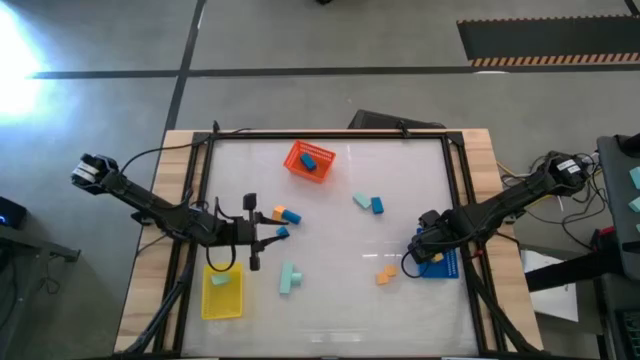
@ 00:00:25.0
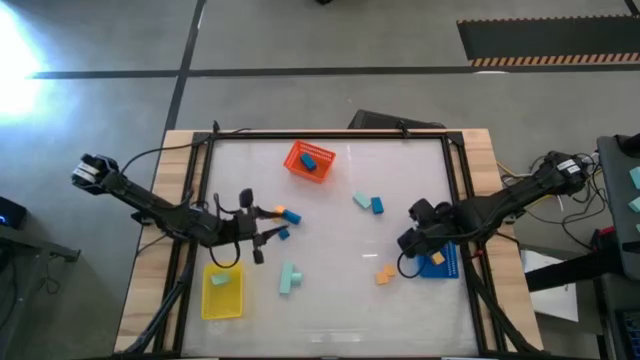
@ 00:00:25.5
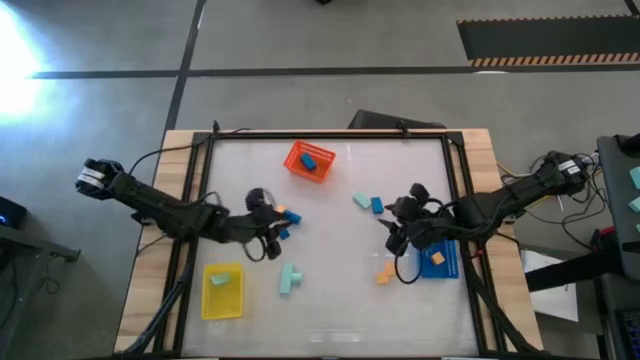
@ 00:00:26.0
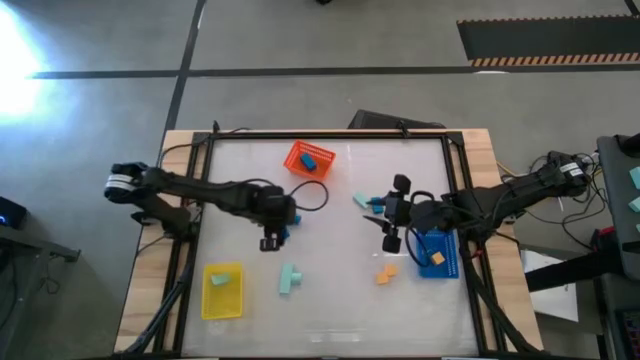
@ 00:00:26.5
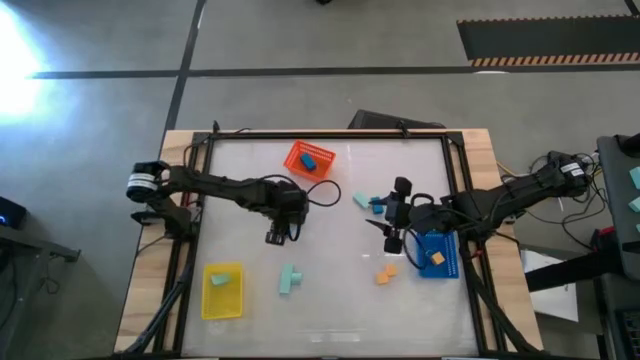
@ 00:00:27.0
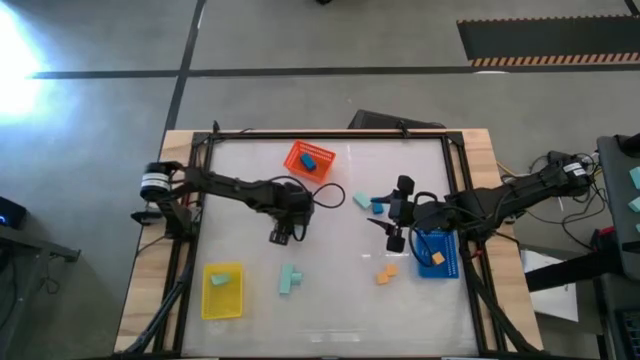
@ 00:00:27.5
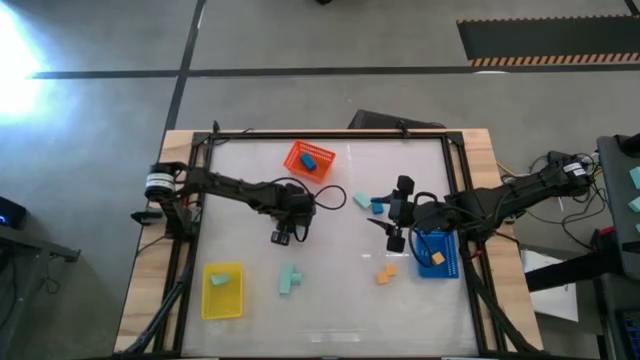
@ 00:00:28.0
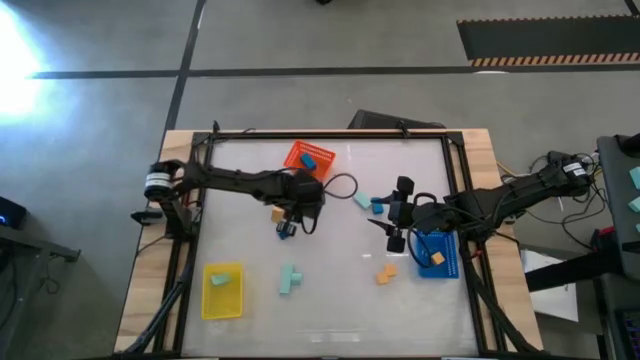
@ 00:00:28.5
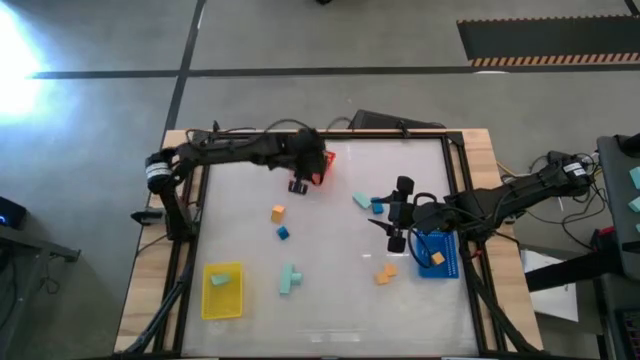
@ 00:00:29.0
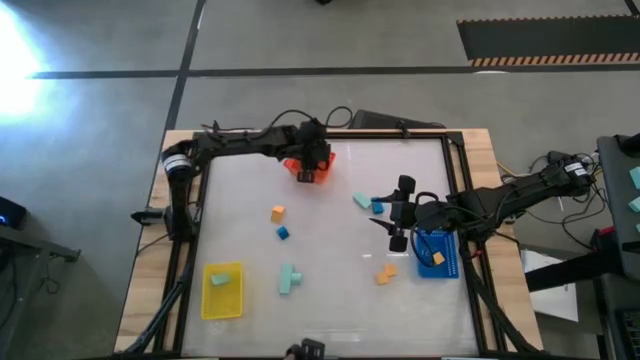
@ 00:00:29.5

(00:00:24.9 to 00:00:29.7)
Task: Sort & place blocks by color
Put the blue block into the orange bin

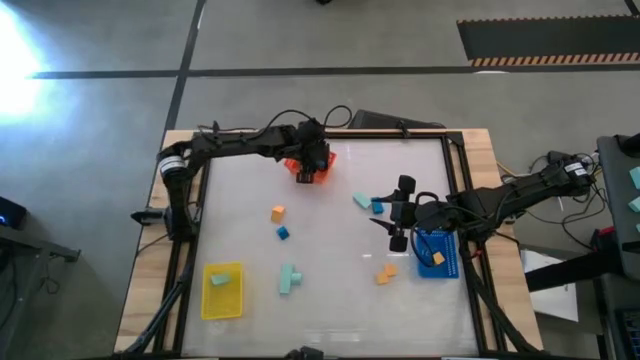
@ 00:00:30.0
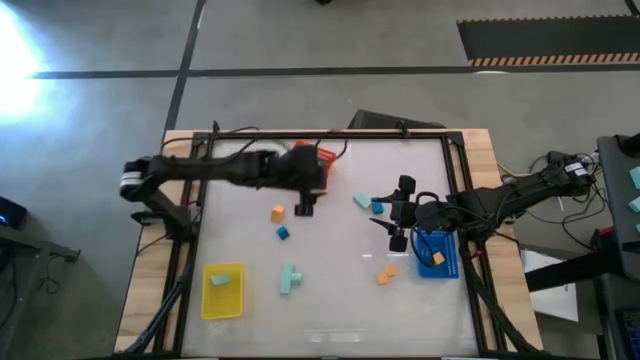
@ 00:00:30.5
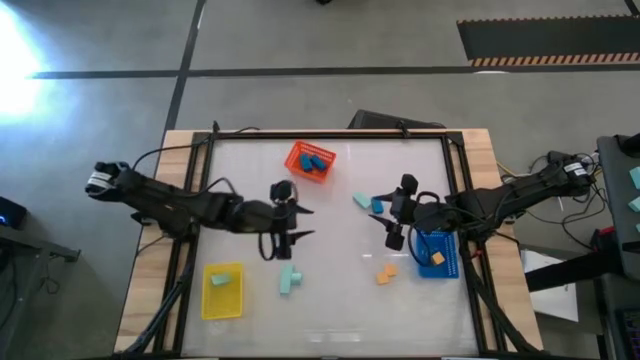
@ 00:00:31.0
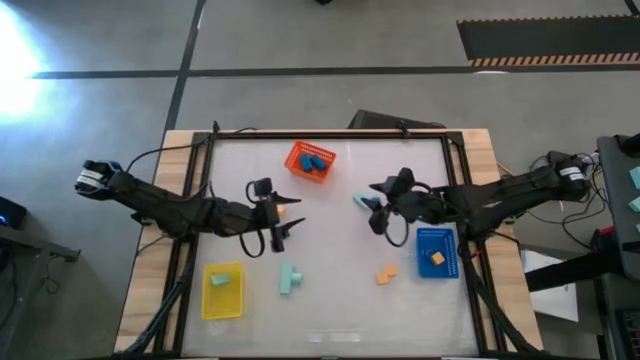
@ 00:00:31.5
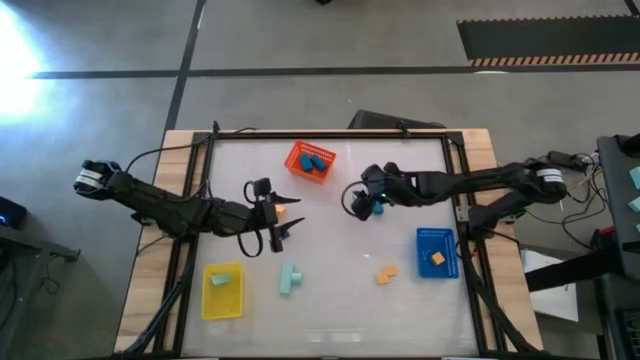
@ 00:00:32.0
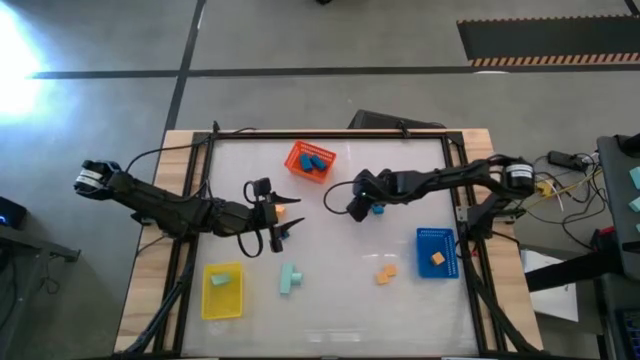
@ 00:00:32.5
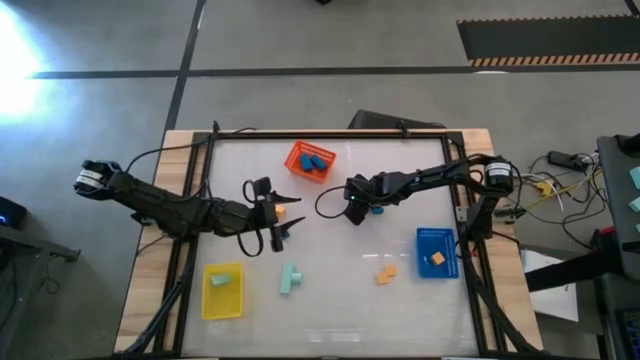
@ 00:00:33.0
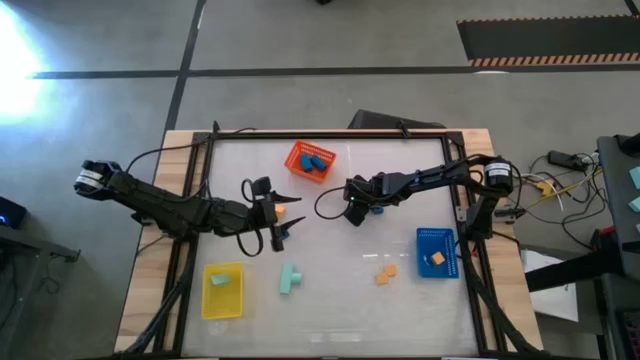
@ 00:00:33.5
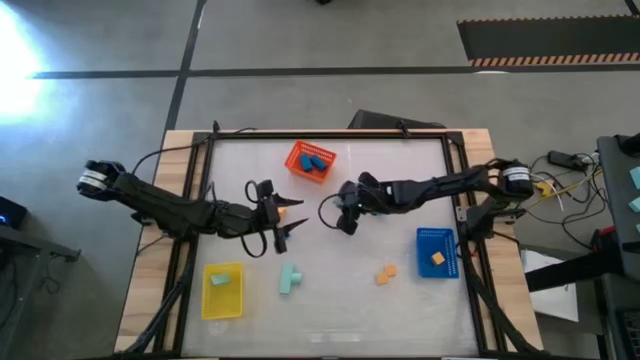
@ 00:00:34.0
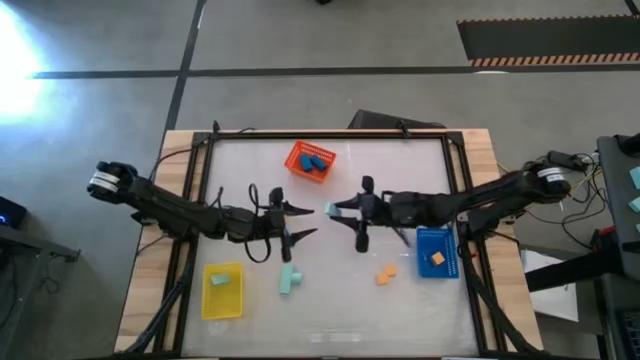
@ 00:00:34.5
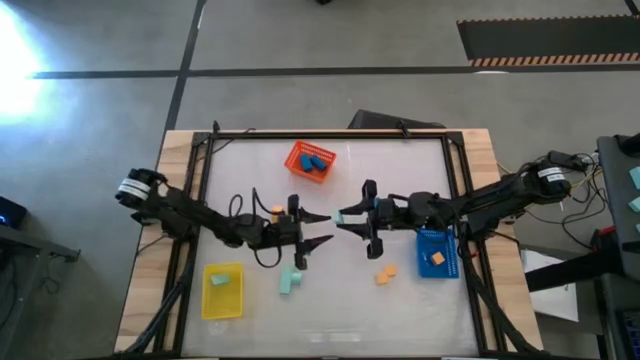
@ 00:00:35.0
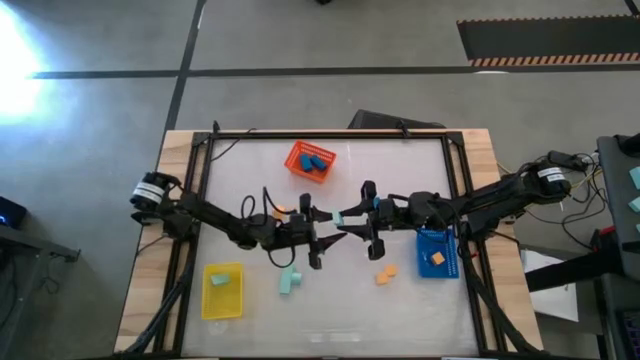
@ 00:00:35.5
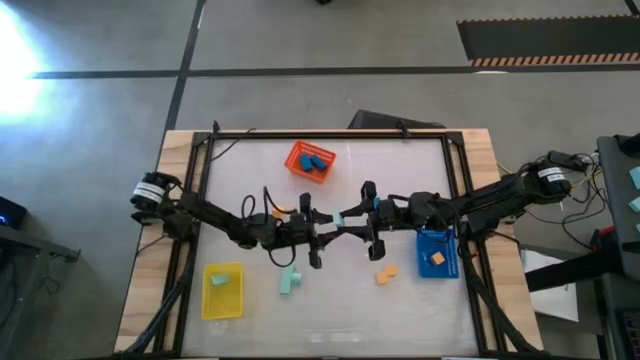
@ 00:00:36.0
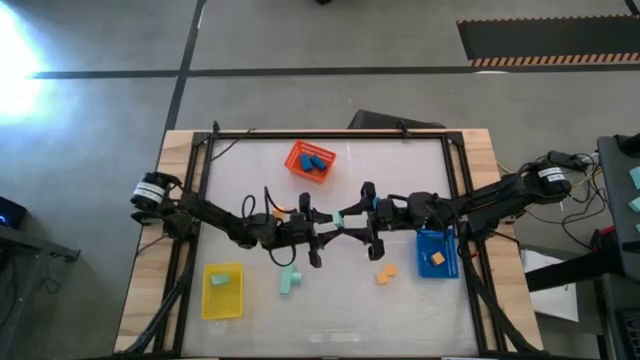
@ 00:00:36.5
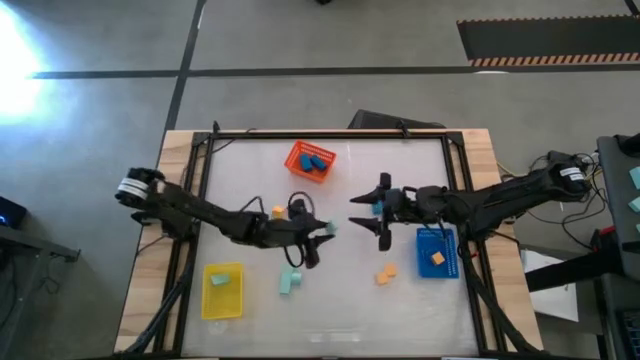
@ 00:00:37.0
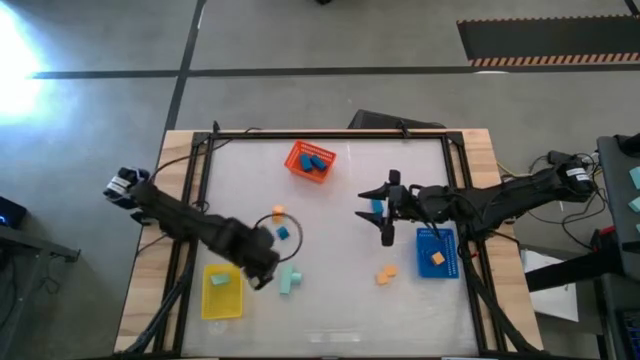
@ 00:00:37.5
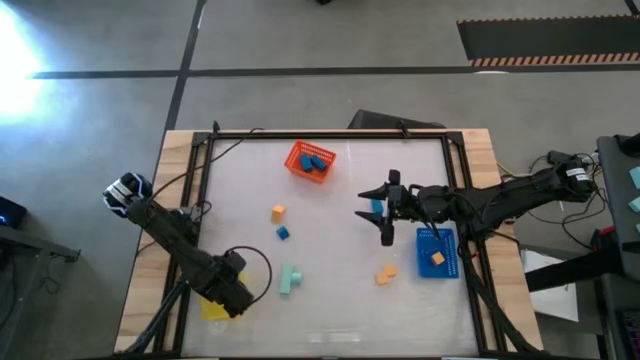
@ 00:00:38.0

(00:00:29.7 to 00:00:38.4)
Put the green block into the yellow bin

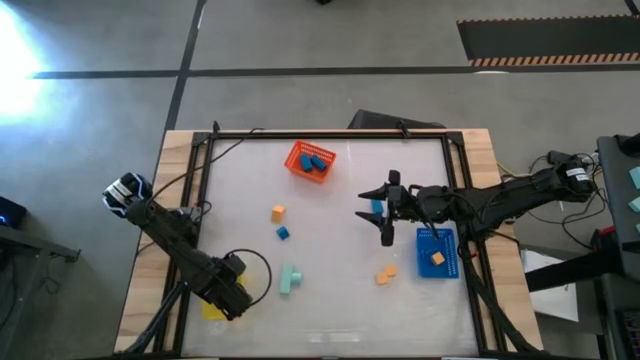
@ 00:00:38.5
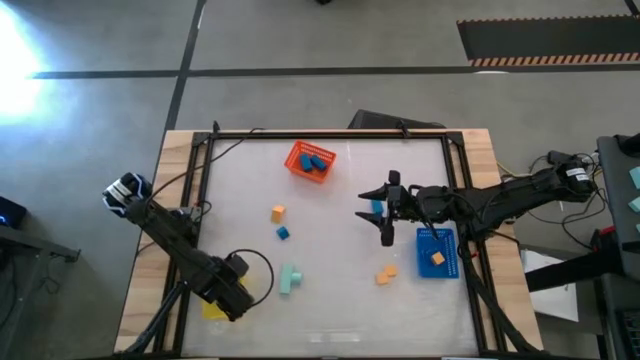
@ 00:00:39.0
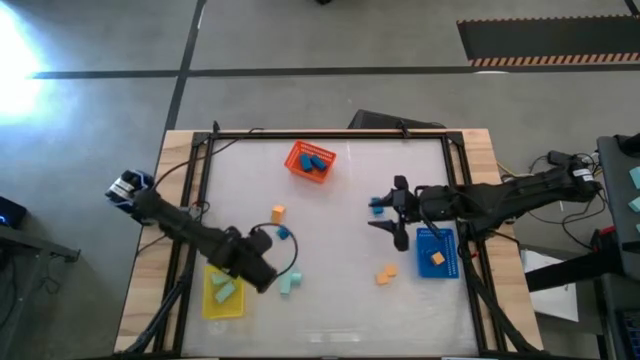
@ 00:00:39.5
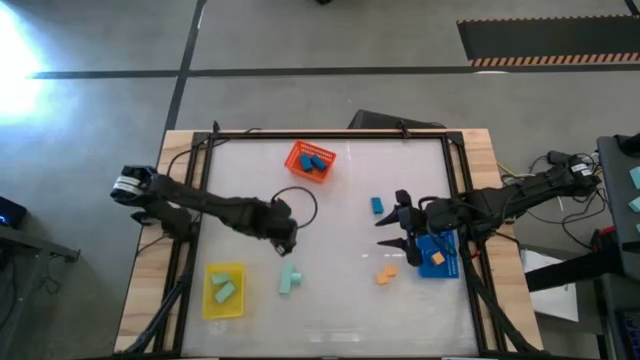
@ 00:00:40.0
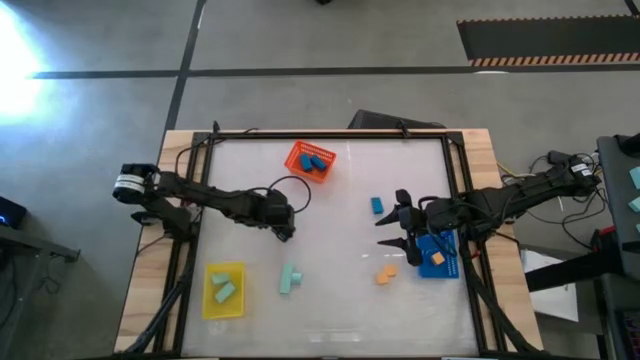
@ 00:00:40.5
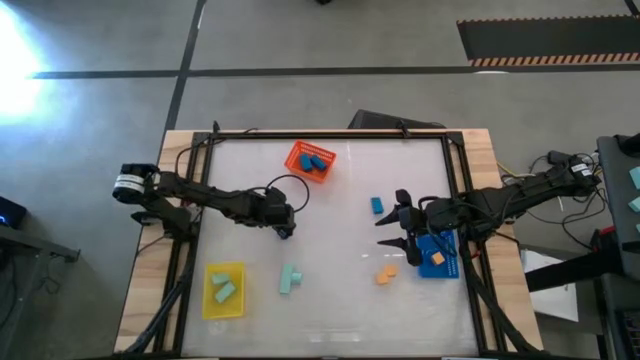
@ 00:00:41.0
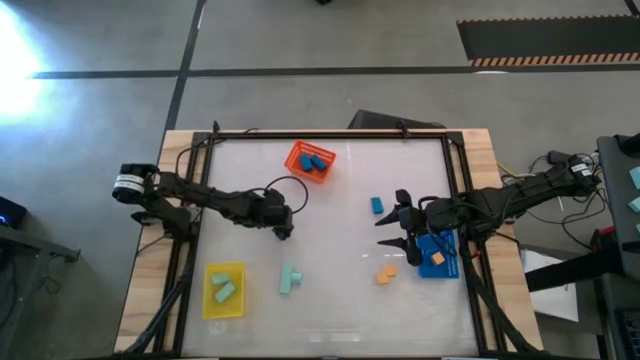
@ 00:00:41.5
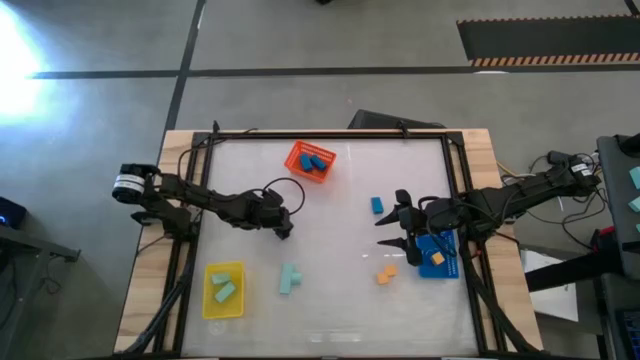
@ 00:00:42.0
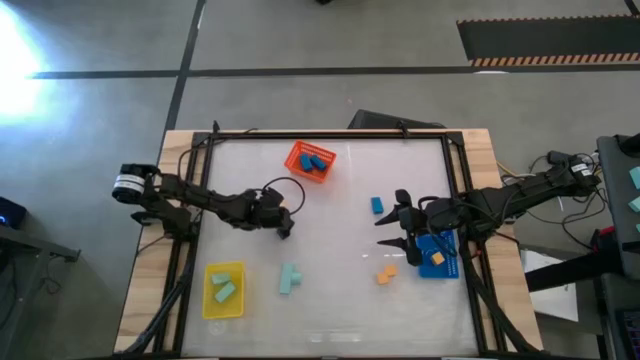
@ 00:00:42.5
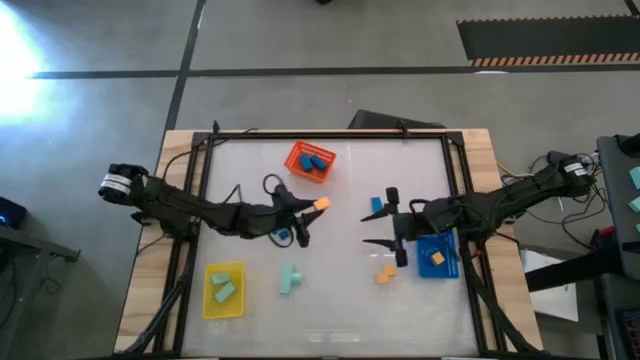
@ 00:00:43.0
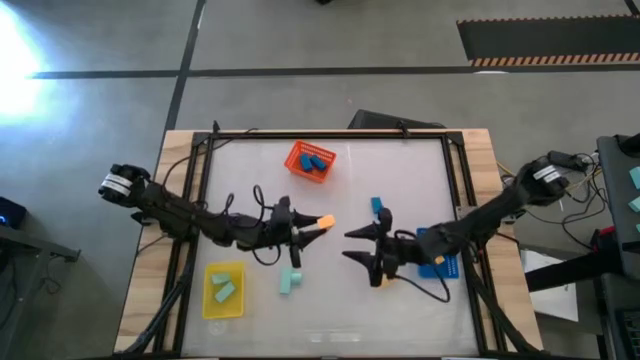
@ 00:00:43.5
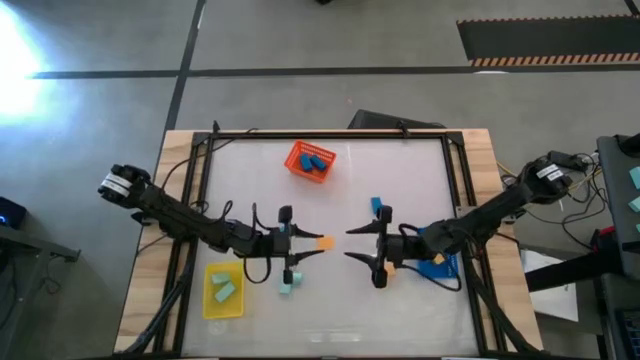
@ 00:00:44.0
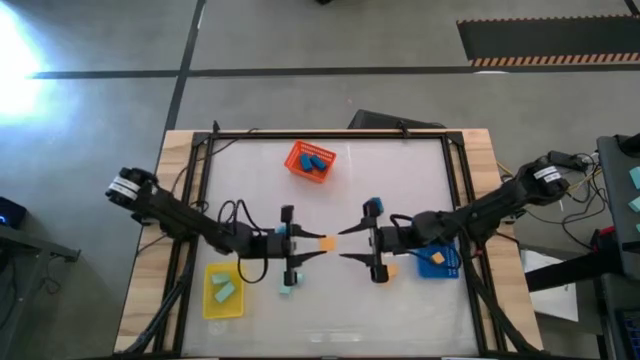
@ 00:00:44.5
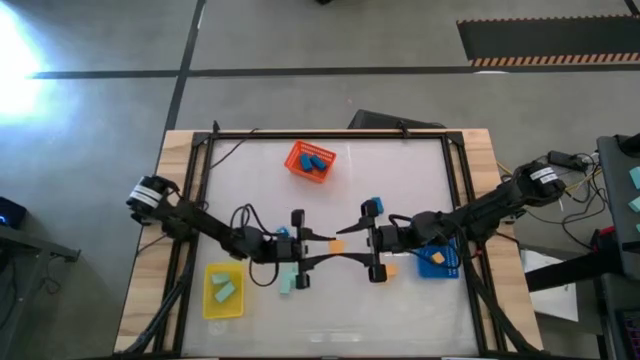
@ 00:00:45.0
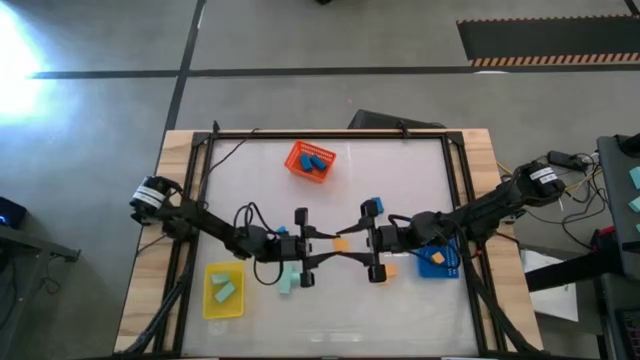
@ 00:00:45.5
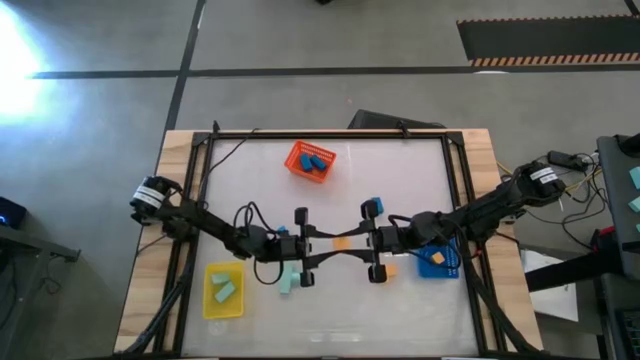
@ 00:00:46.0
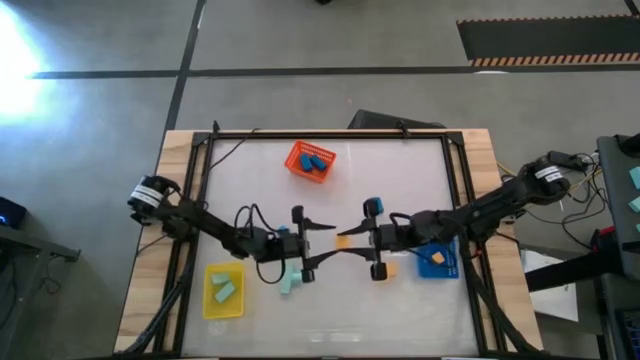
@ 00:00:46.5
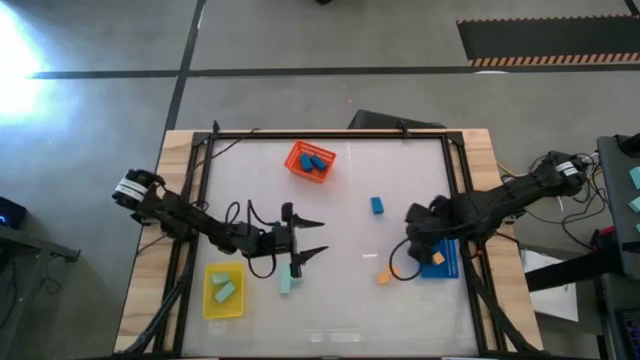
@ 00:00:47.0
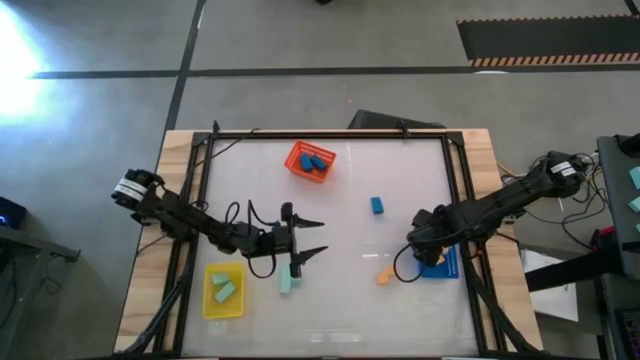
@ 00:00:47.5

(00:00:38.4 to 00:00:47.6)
Put the yellow block into the blue bin
